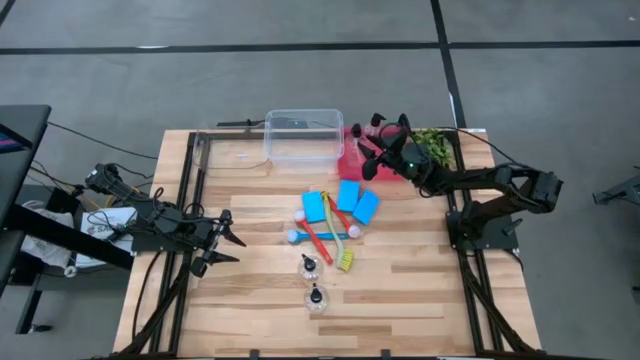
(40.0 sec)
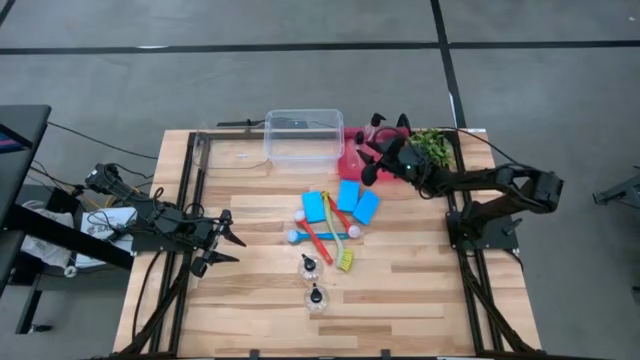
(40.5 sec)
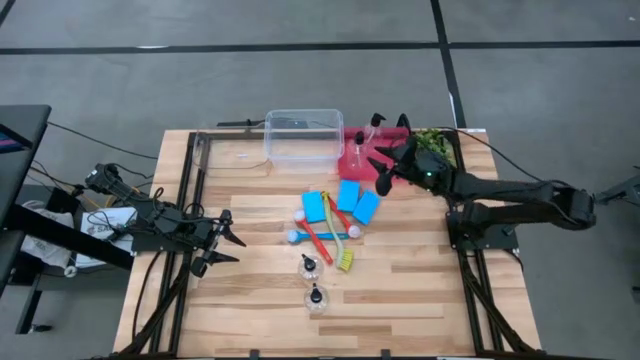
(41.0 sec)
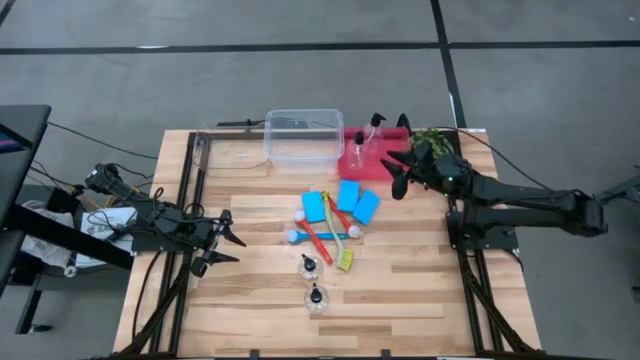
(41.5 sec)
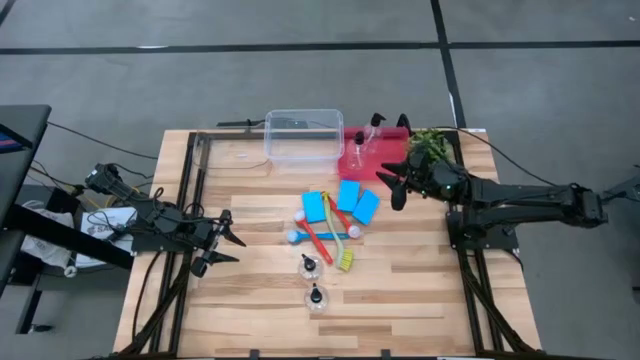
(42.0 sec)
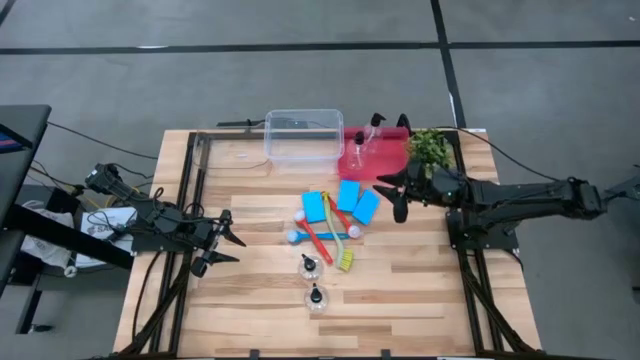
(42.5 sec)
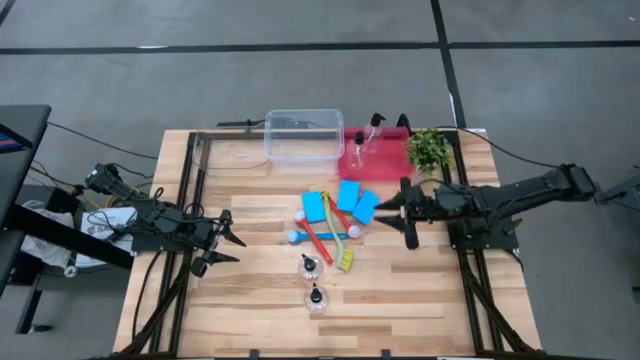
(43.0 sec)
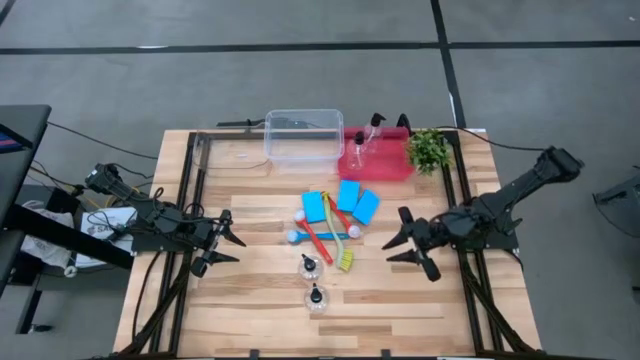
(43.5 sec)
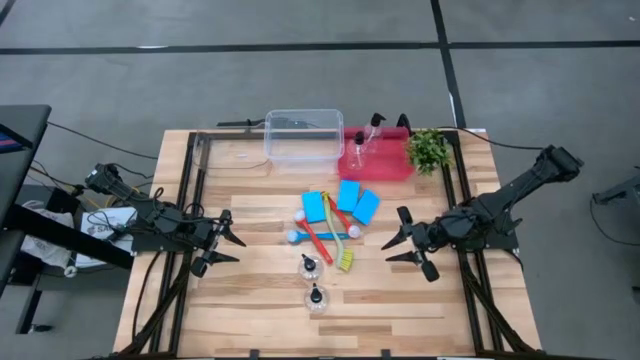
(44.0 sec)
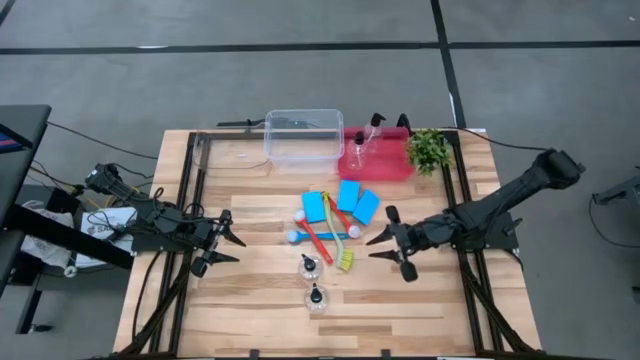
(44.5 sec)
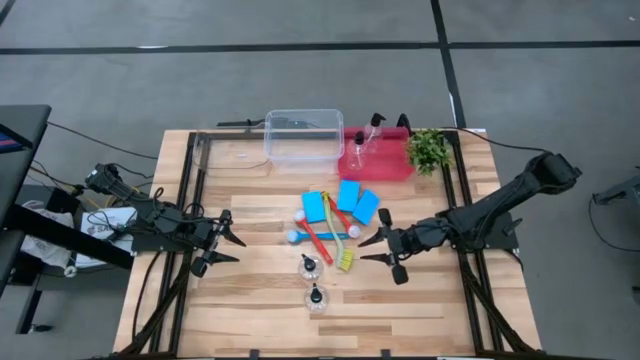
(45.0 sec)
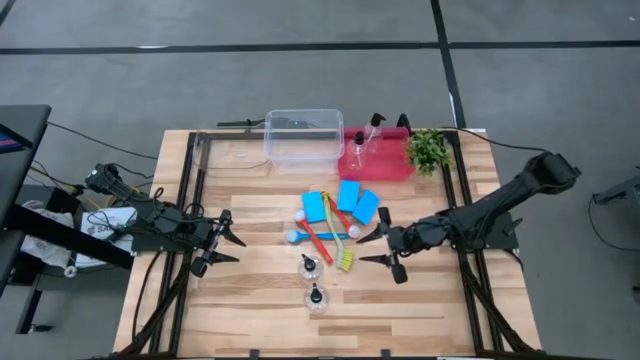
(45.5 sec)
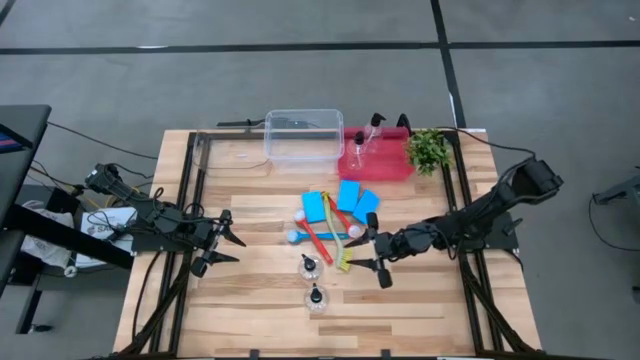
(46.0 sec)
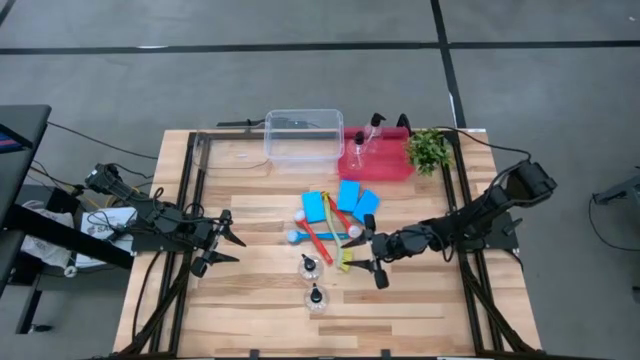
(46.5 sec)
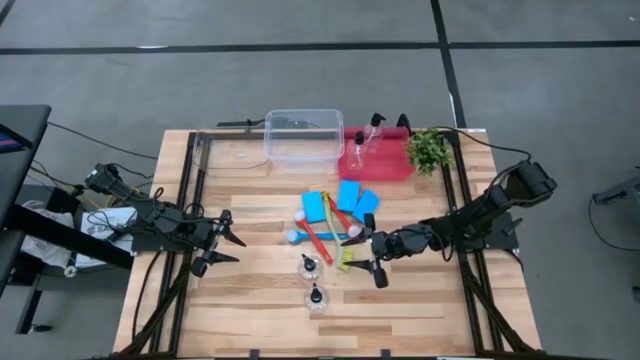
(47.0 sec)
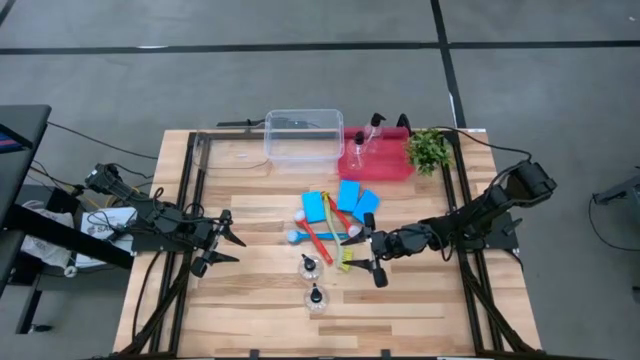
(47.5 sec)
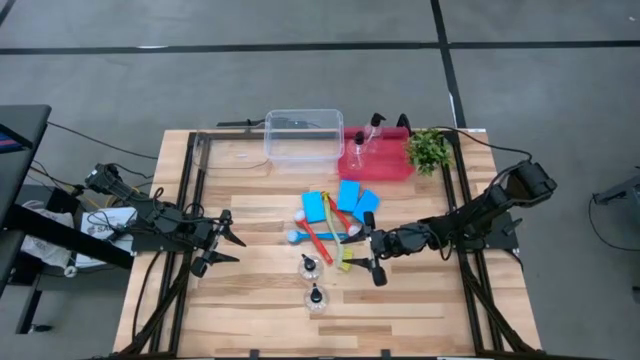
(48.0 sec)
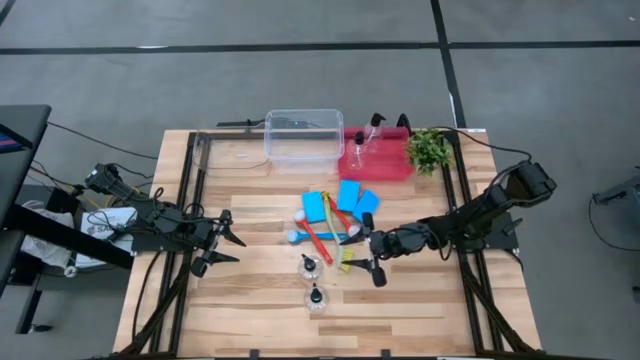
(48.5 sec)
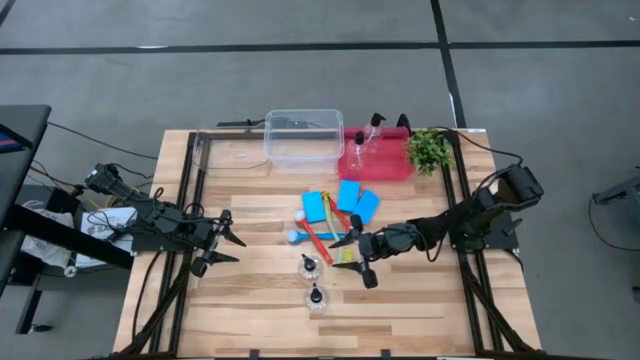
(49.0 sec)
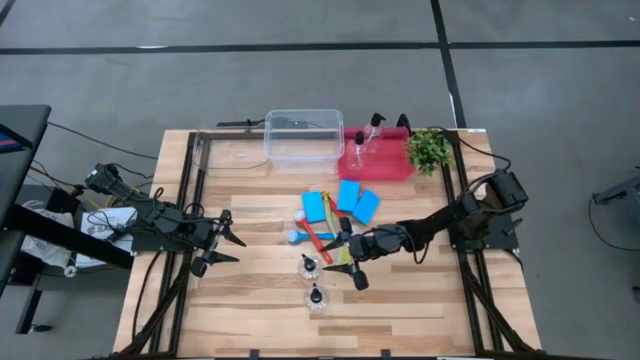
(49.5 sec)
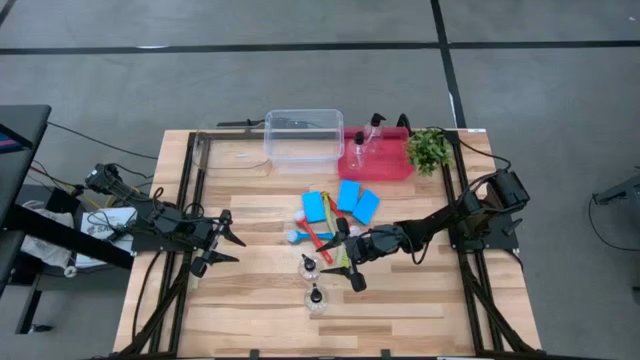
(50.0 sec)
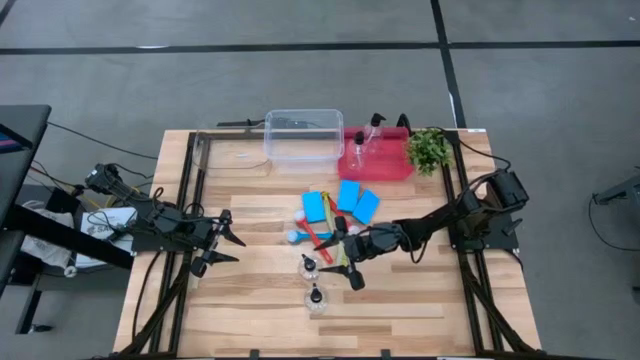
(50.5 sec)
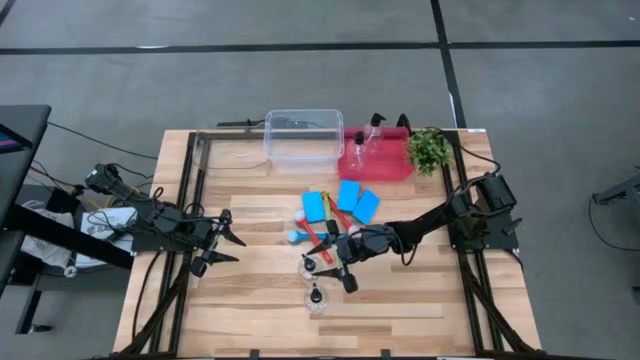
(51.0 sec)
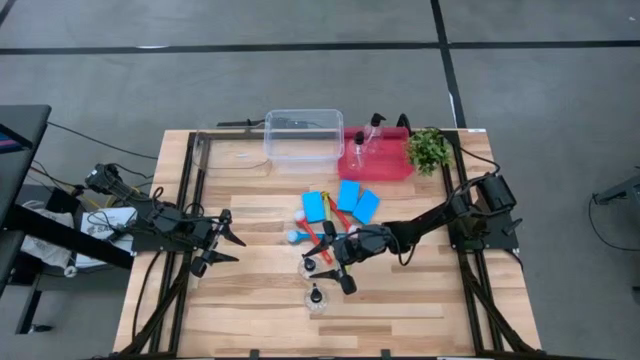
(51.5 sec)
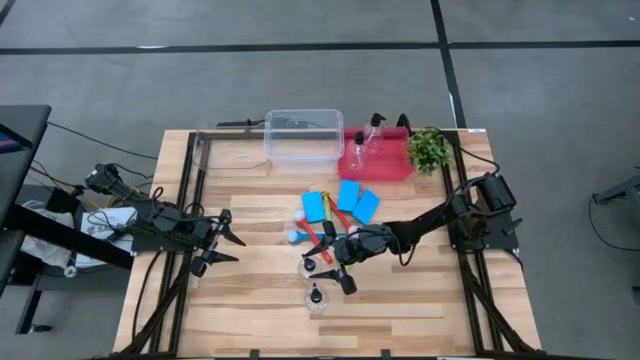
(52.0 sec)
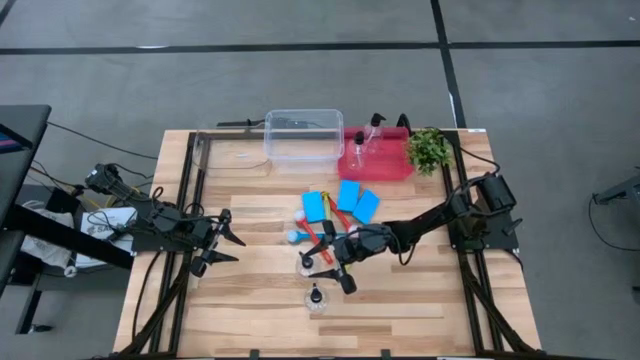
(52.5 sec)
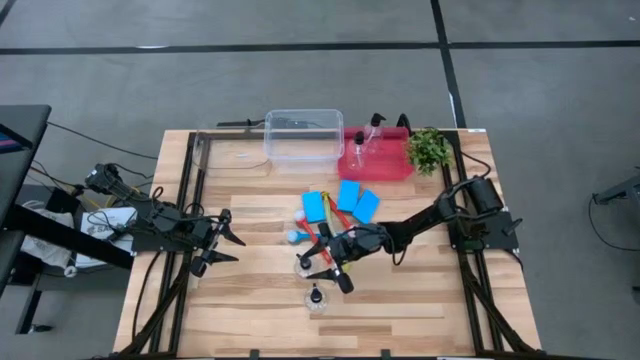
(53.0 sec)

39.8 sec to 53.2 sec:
Task: Pick & Place Kitchen Sink Supplies
Put the transparent bottle into the red bin

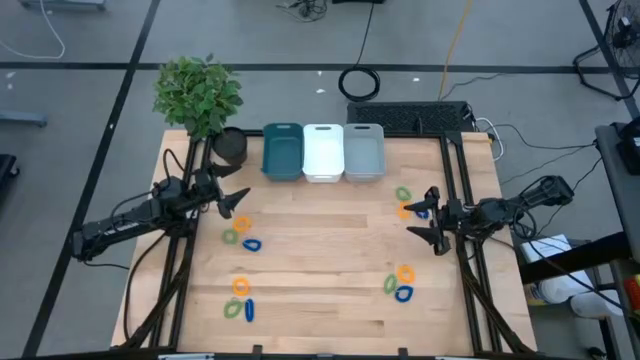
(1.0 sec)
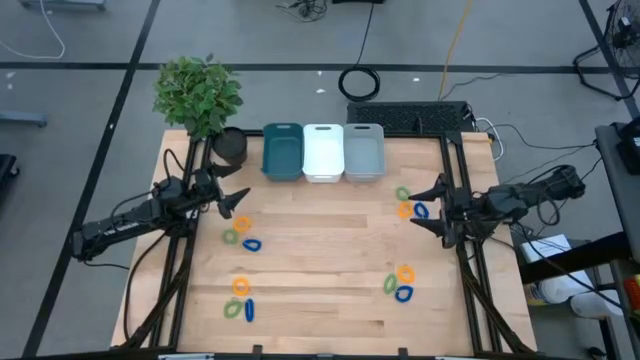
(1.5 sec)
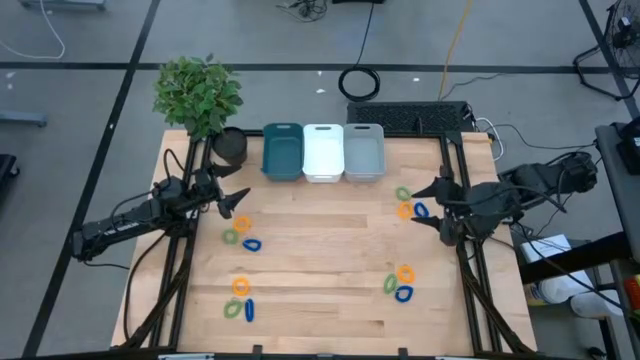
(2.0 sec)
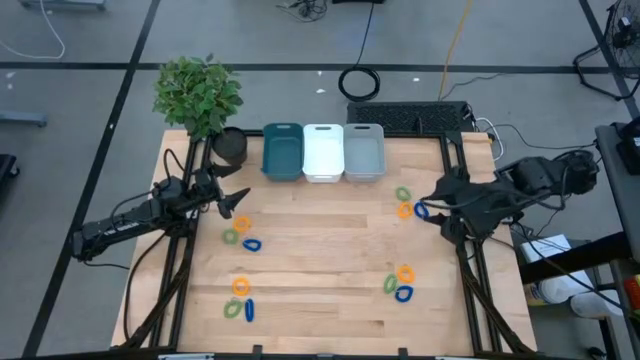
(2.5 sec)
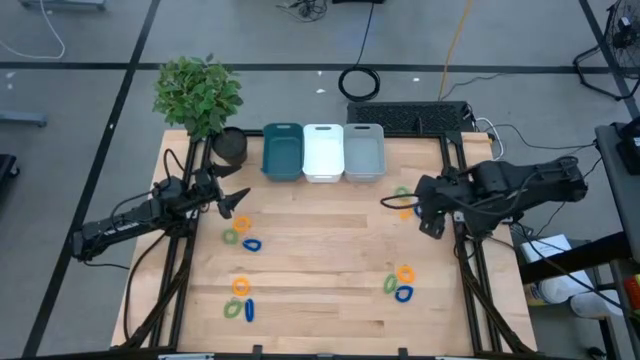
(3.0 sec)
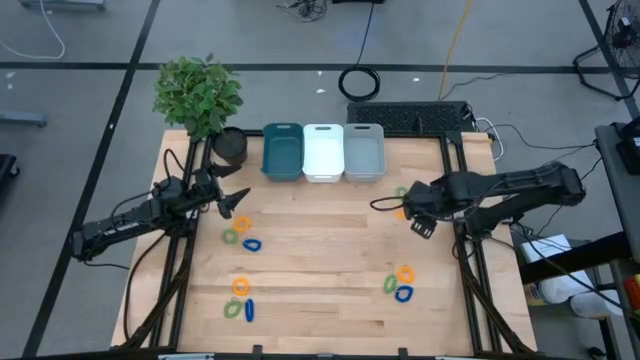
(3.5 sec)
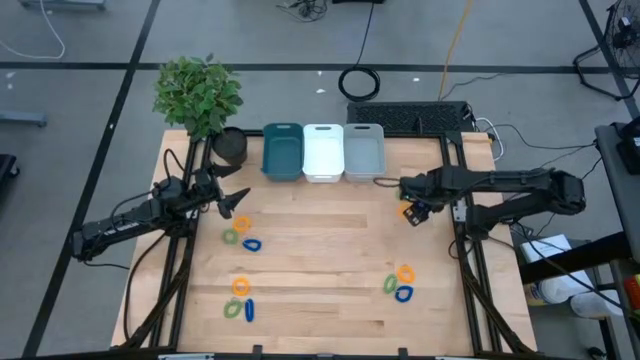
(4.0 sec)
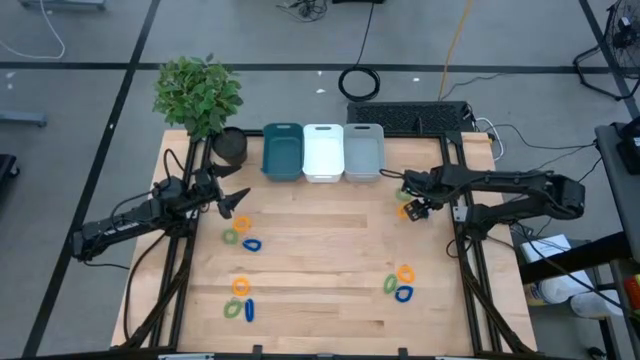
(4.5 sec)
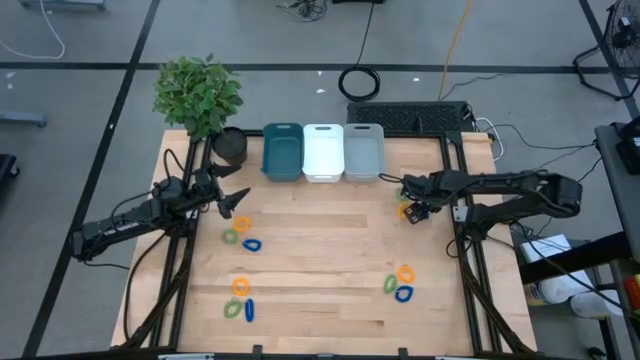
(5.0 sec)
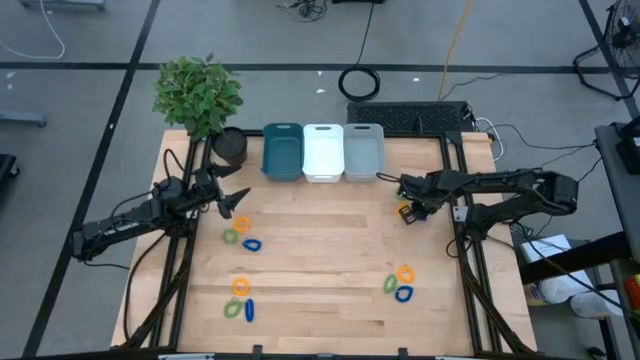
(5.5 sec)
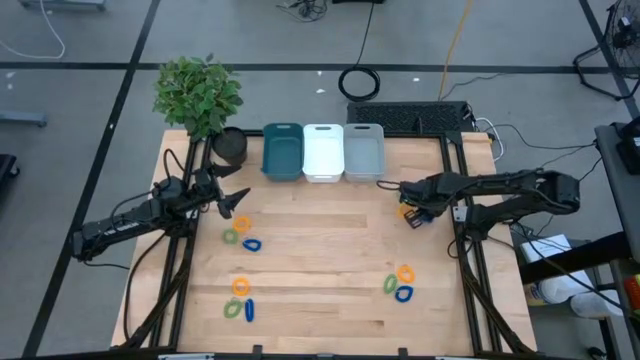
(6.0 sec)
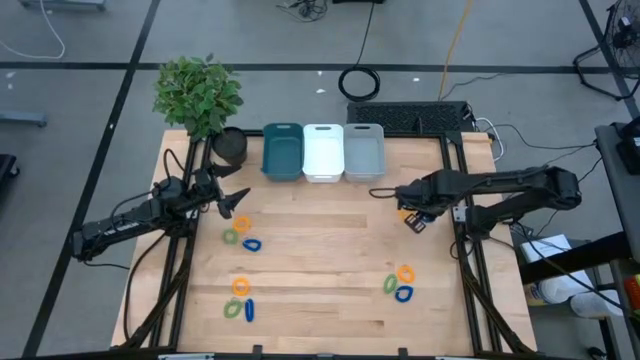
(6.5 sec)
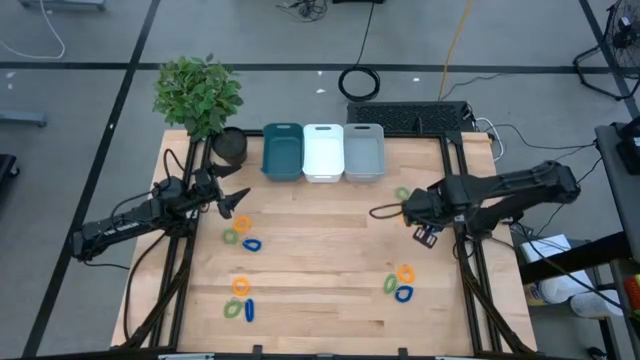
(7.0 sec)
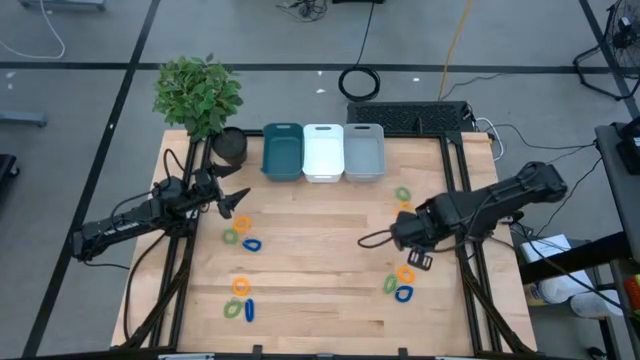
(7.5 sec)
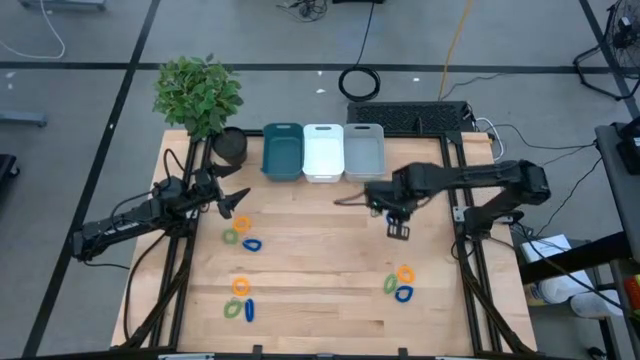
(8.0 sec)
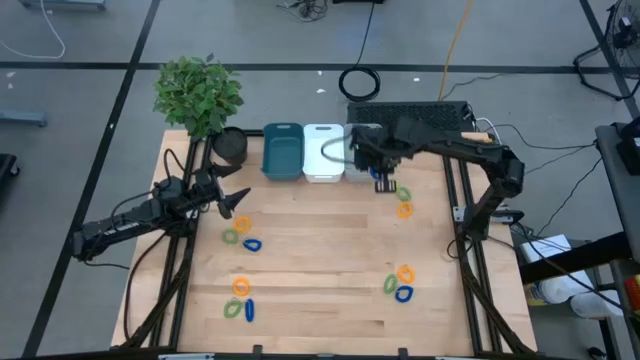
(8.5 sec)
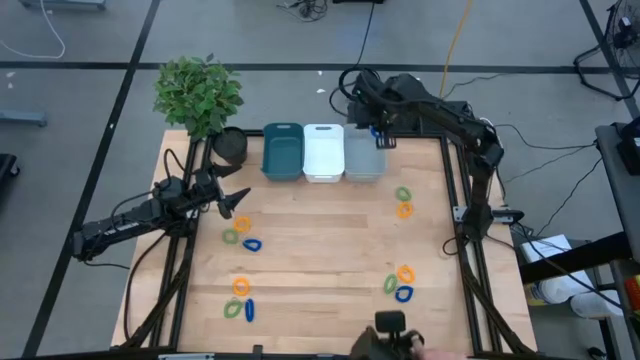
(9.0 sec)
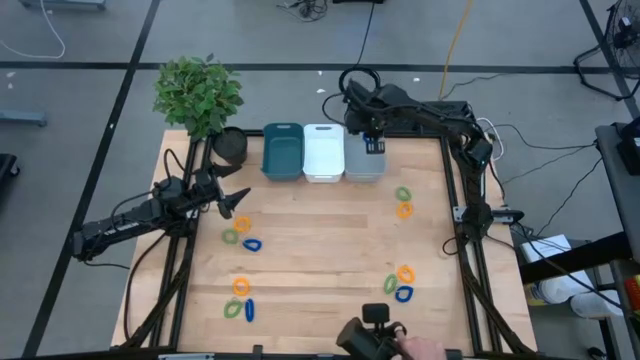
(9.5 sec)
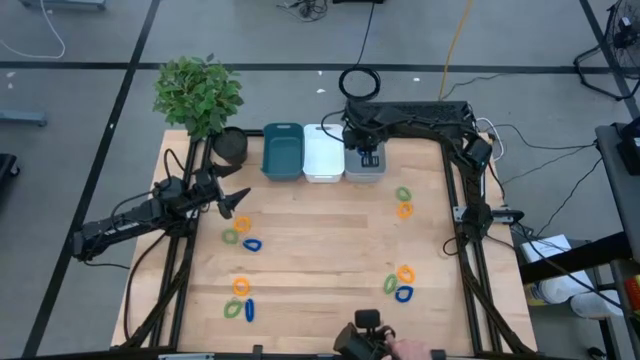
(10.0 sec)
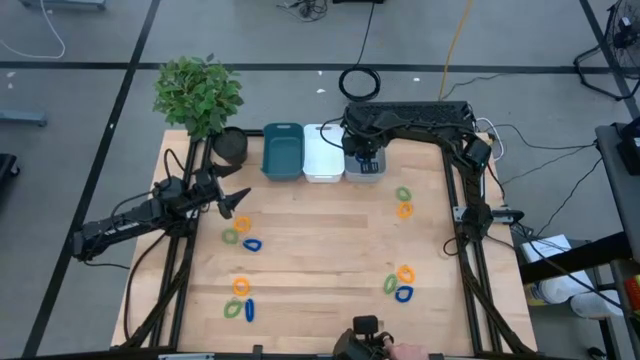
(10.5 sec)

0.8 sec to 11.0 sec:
Task: Sort spring keychains
Put the blue spring keychain in the gray bin
